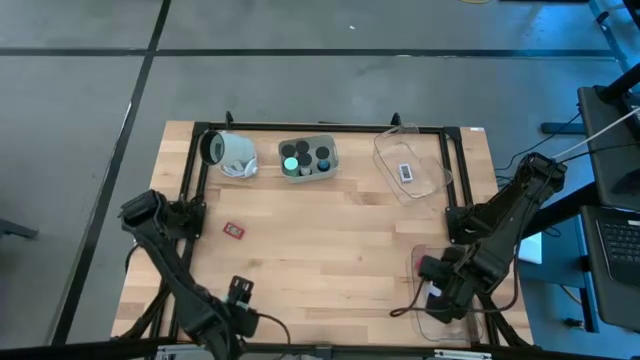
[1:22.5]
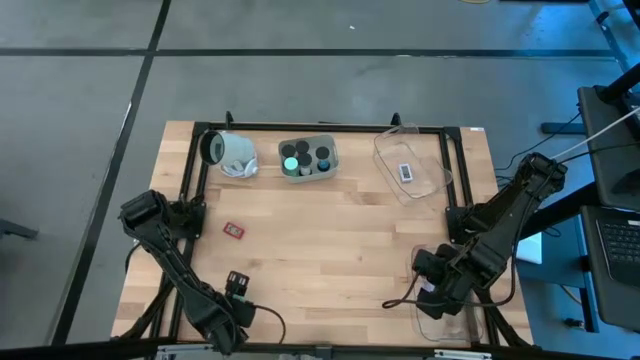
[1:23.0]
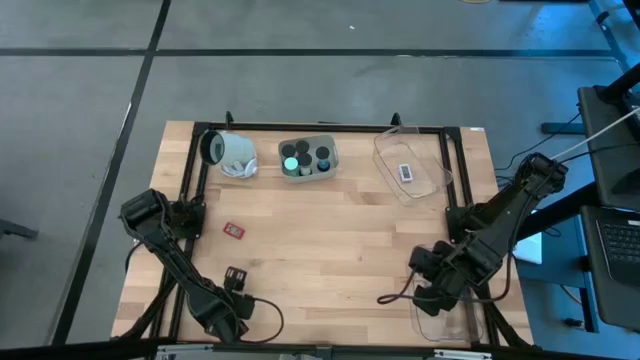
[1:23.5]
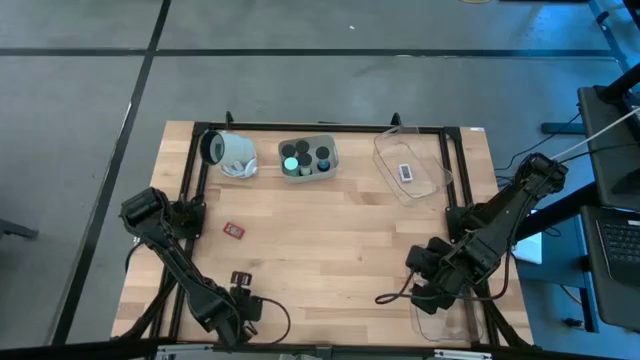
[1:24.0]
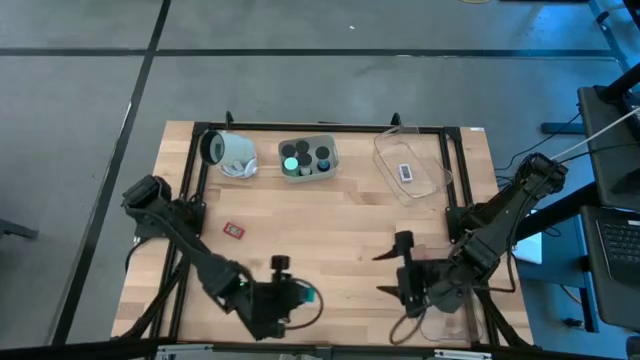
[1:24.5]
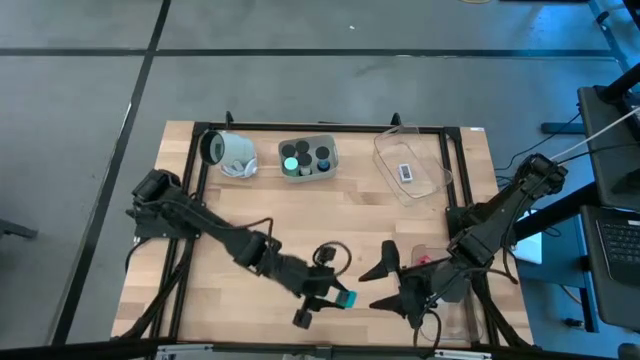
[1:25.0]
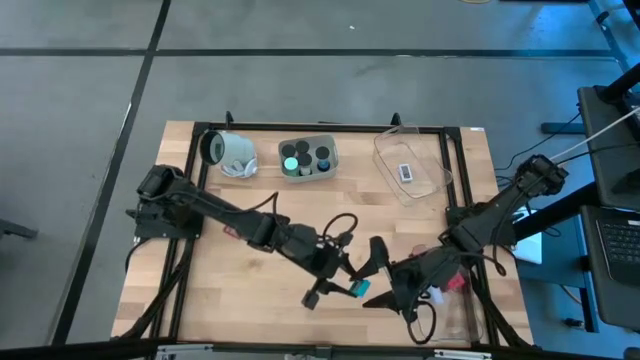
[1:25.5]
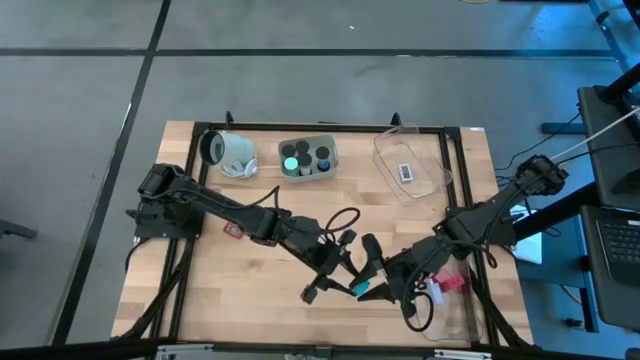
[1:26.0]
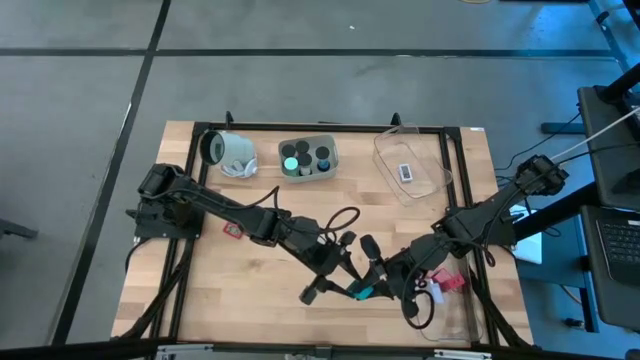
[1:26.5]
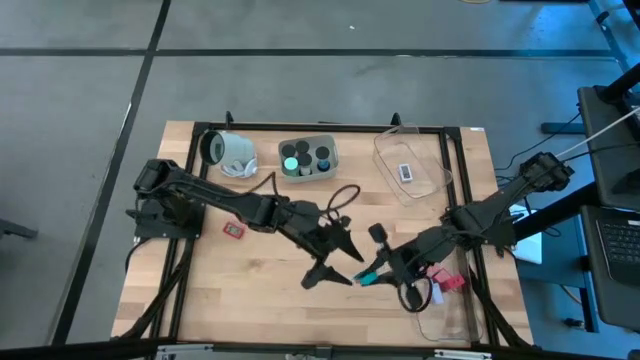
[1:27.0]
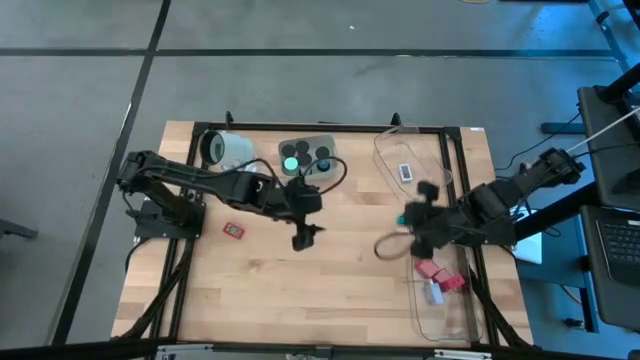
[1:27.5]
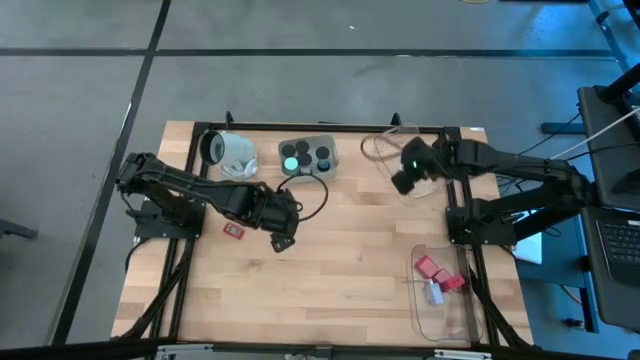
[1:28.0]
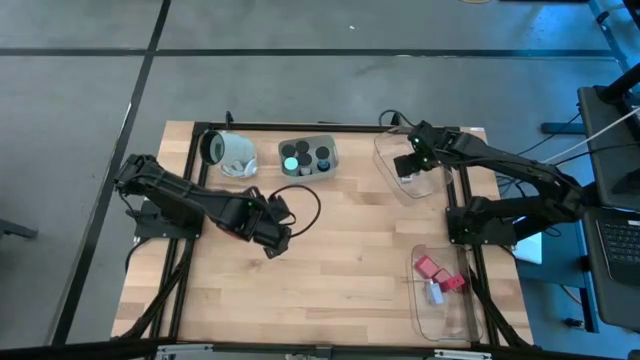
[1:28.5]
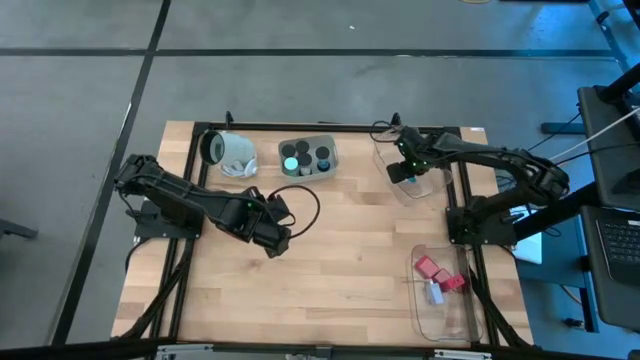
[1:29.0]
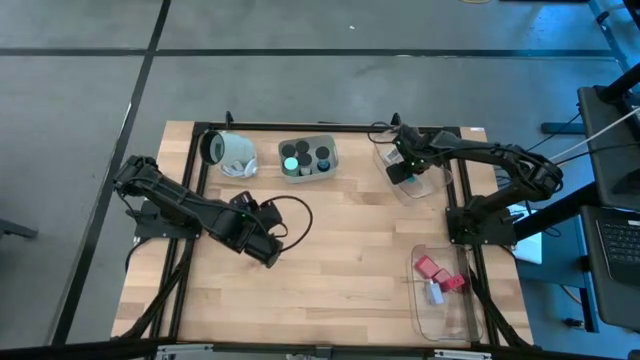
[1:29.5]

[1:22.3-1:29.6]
Task: Pick & Place Office items
Put the blue digital clock into the top transparent bin

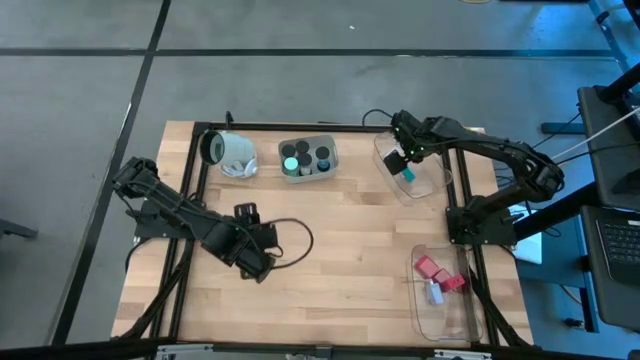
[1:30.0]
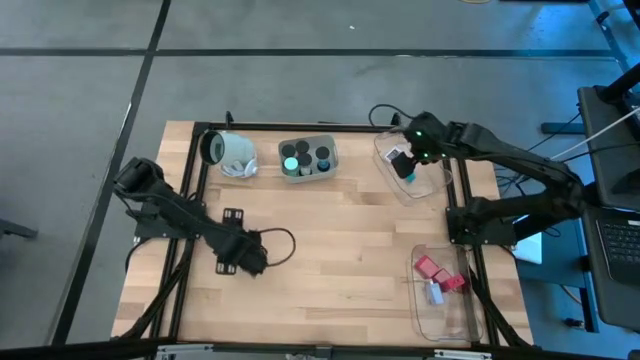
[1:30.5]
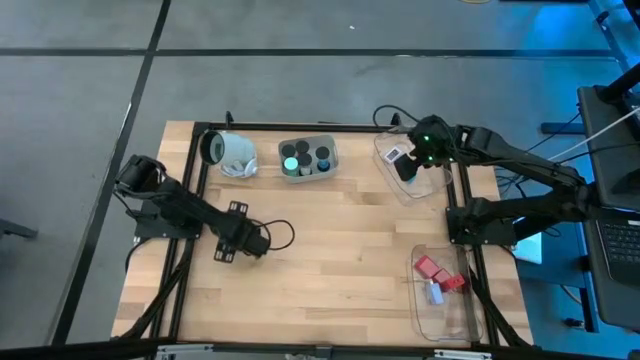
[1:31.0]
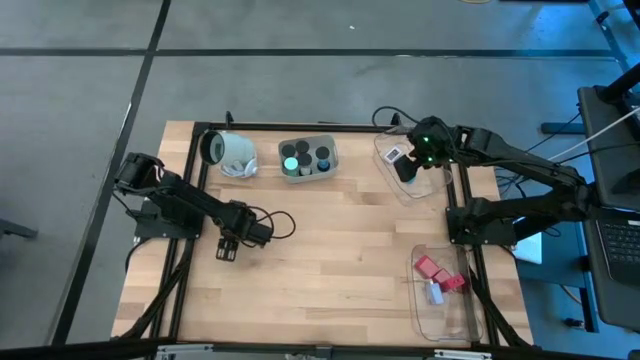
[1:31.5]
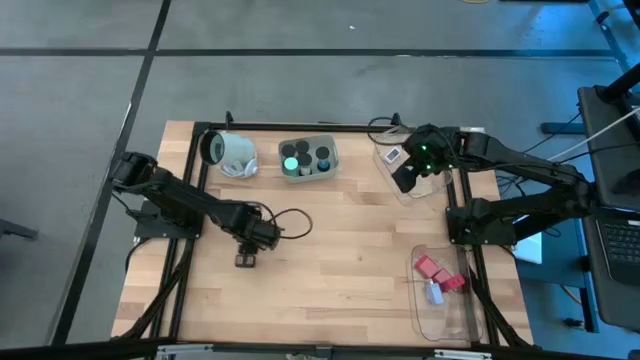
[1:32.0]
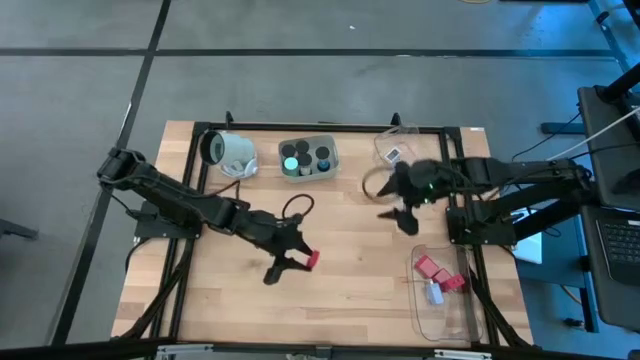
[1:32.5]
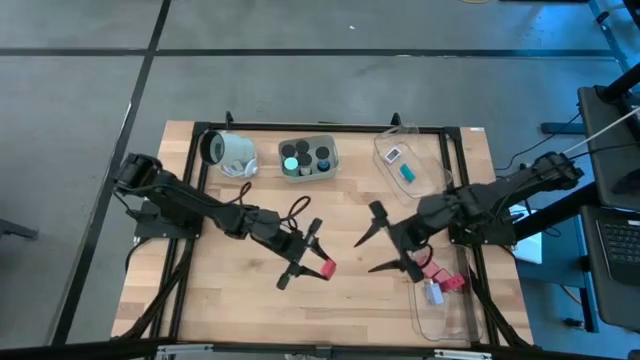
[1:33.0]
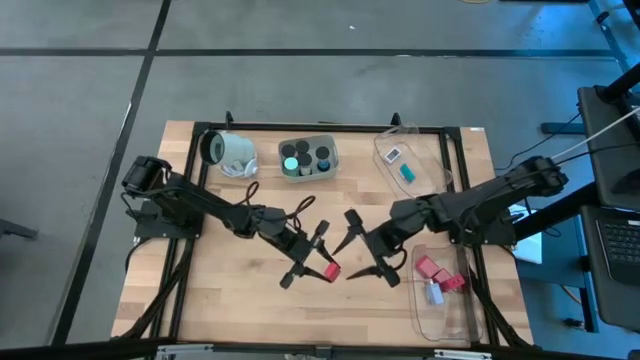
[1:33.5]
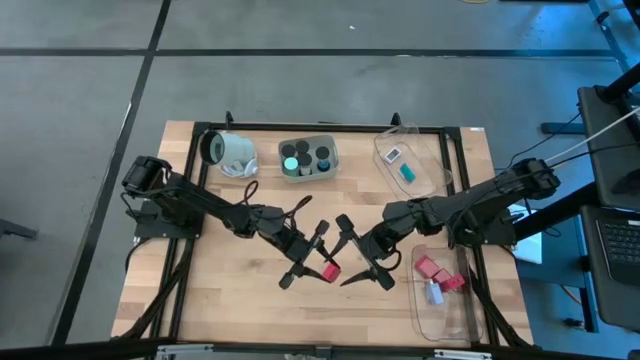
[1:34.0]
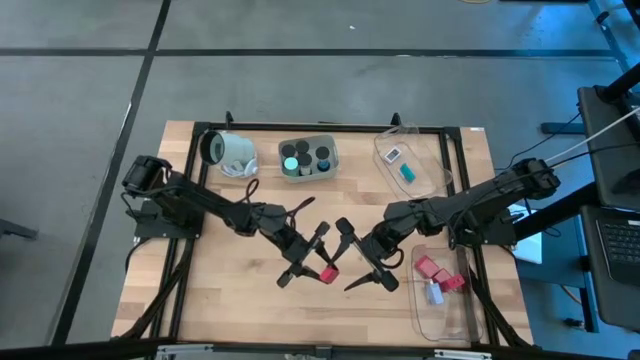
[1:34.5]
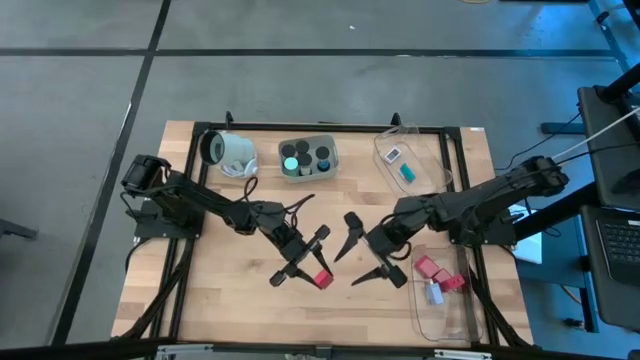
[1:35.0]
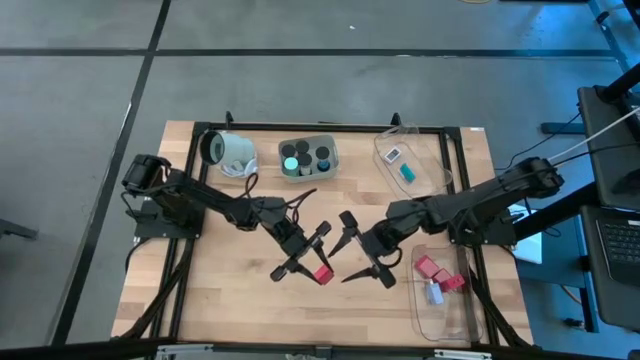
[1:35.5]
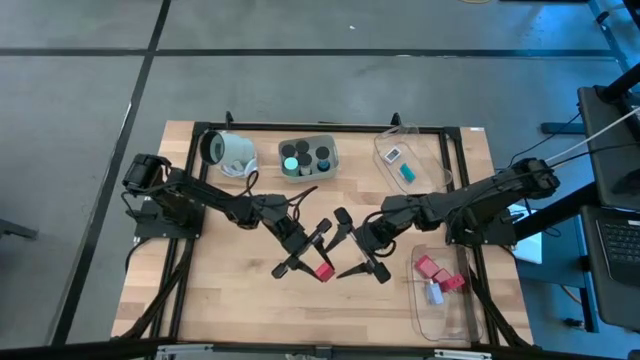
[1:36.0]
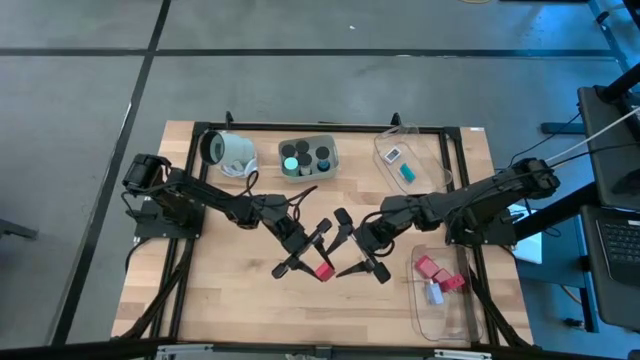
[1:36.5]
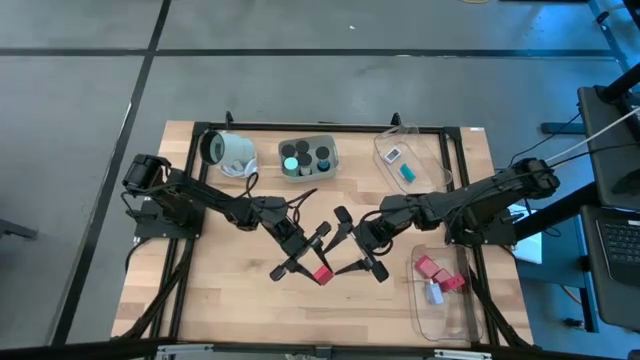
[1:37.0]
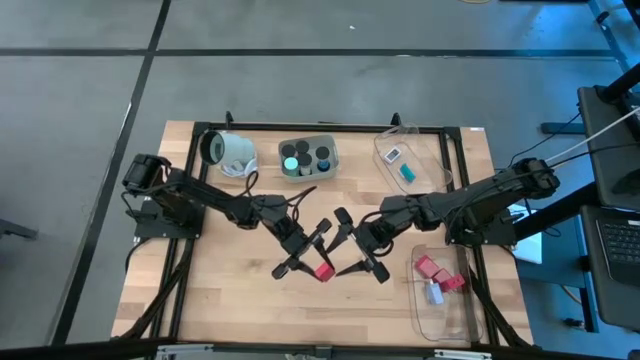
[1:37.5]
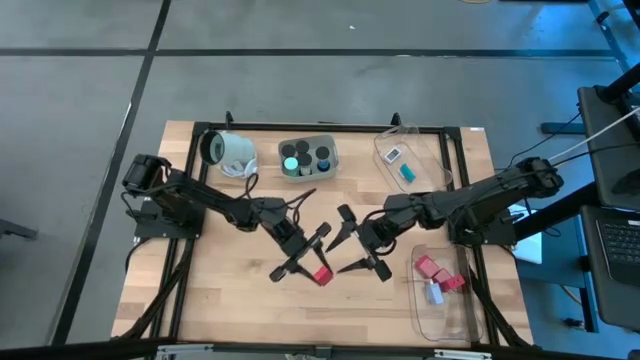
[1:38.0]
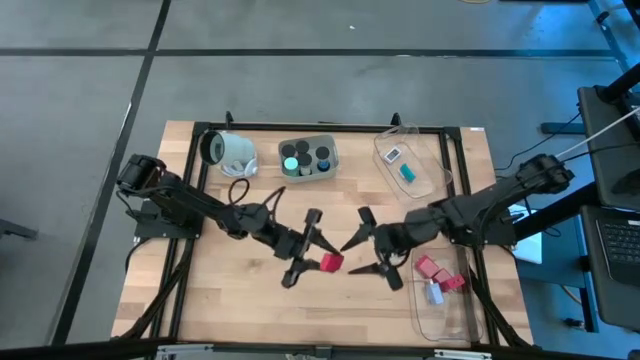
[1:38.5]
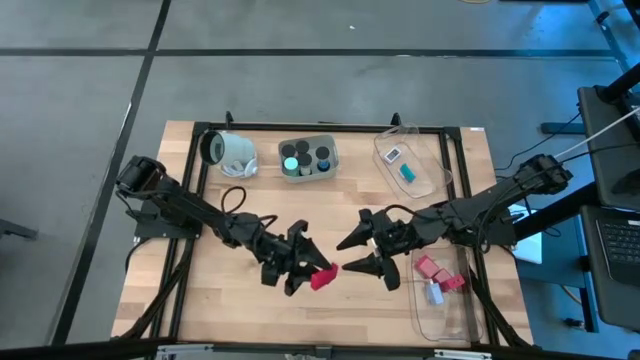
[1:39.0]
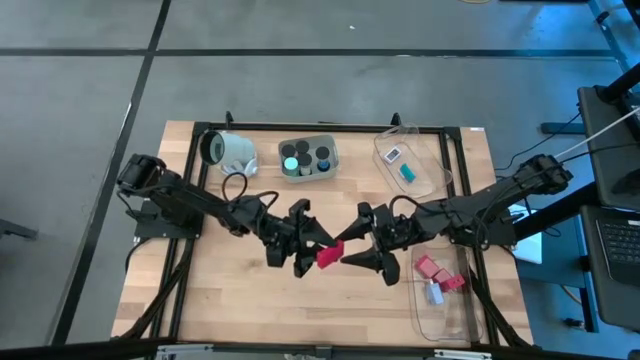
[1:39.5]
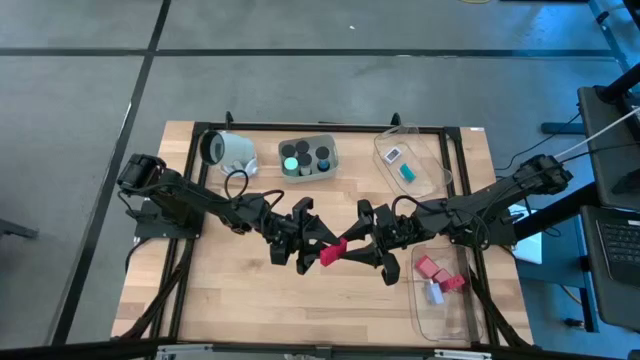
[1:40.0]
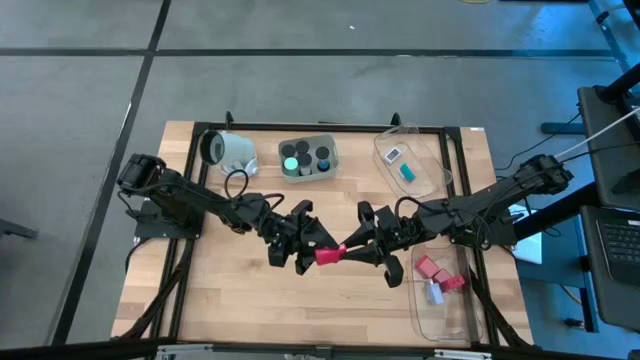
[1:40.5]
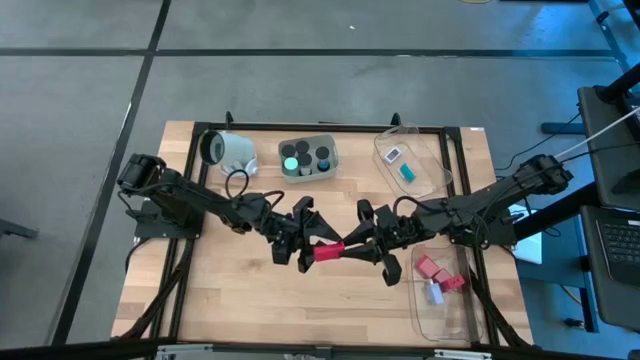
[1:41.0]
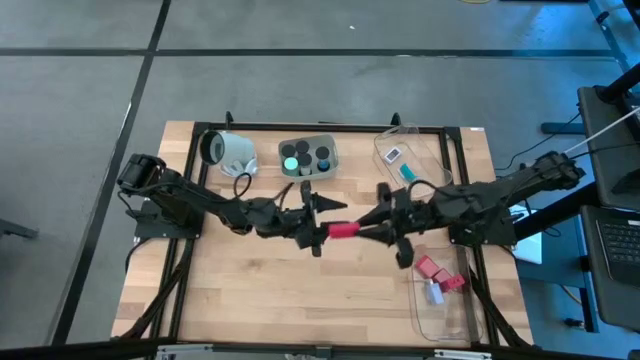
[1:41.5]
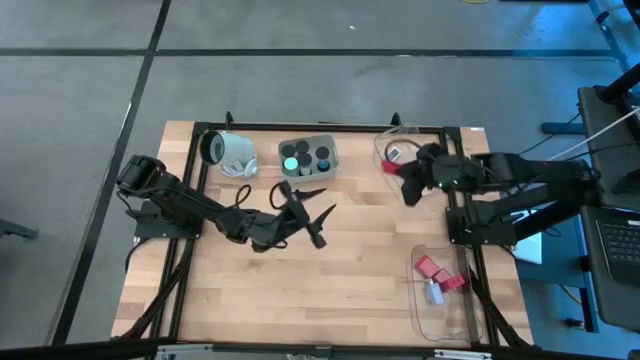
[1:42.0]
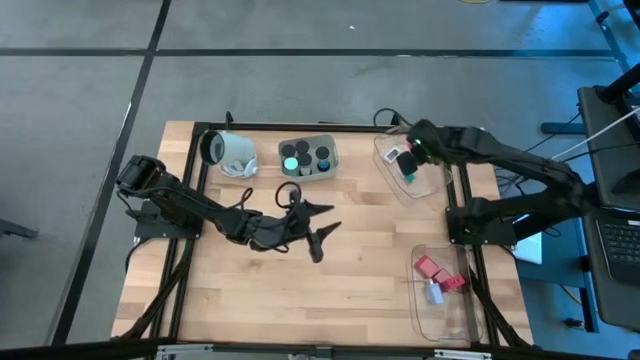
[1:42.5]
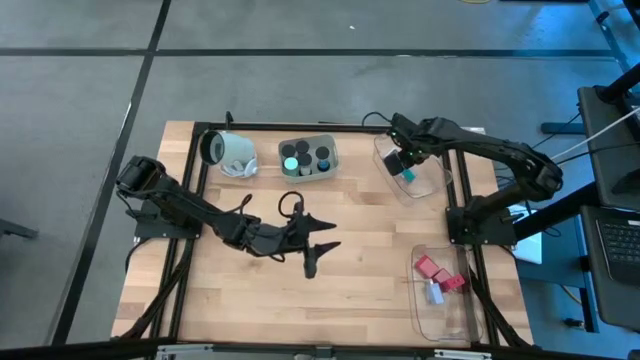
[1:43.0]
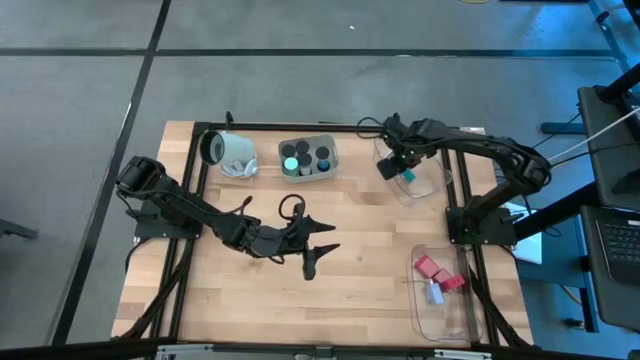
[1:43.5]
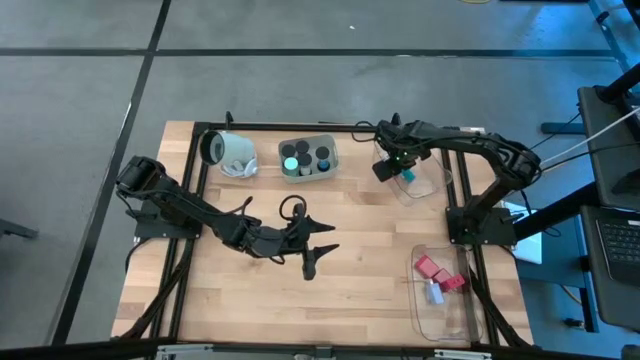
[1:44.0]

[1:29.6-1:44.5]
Put the red digital clock into the top transparent bin
